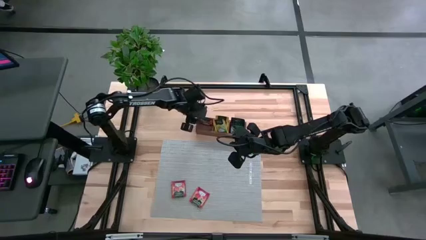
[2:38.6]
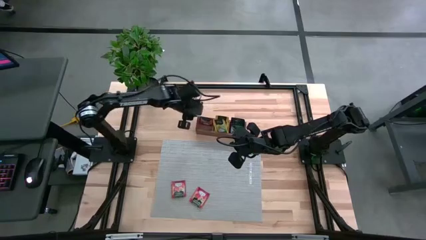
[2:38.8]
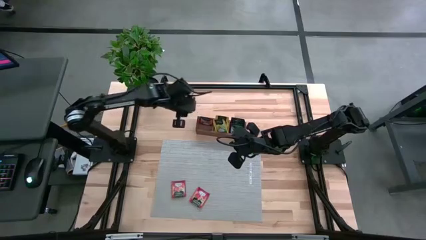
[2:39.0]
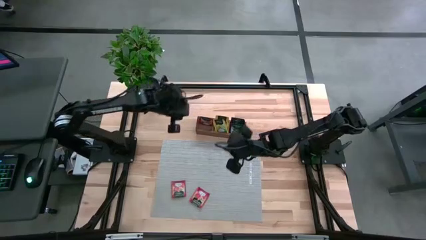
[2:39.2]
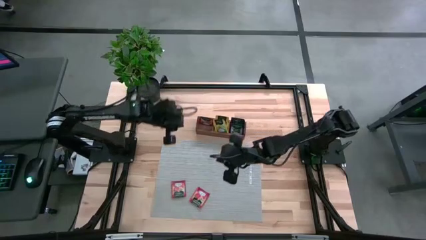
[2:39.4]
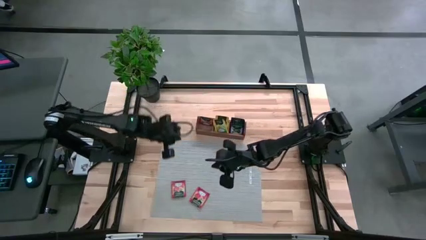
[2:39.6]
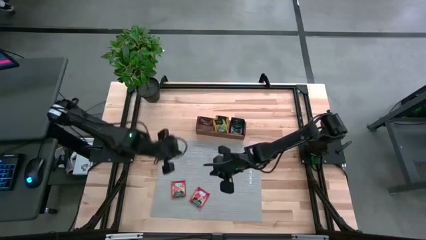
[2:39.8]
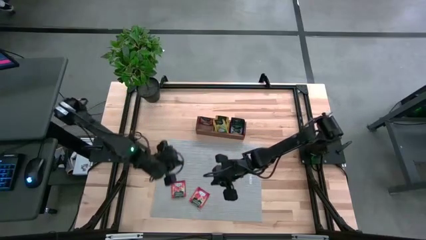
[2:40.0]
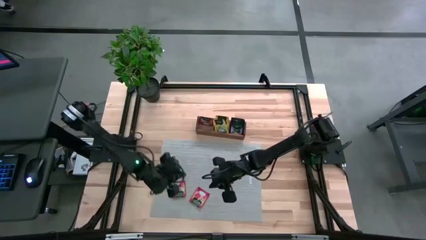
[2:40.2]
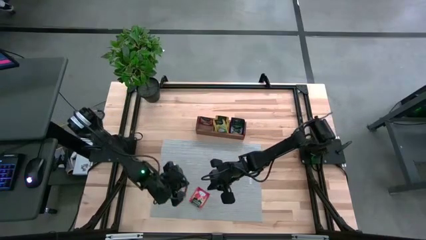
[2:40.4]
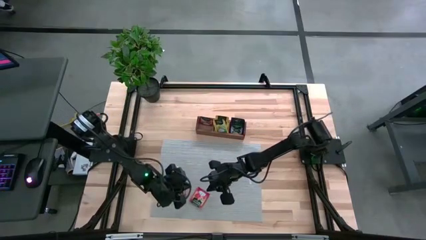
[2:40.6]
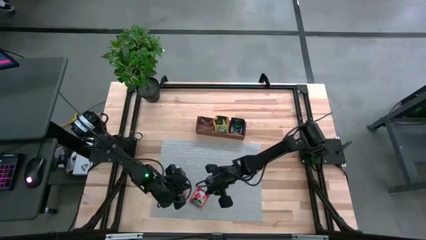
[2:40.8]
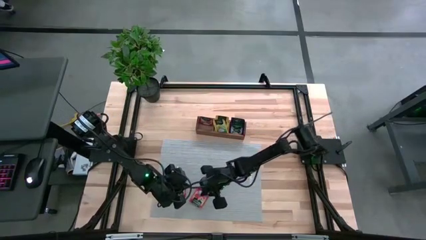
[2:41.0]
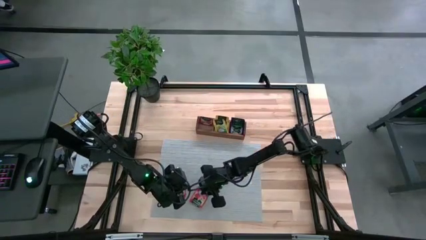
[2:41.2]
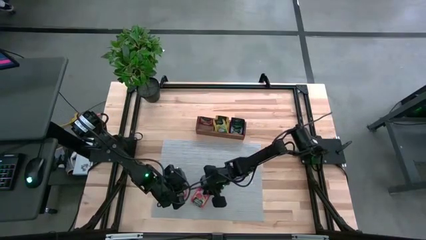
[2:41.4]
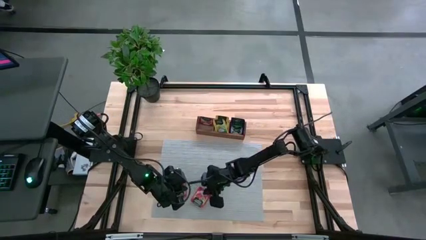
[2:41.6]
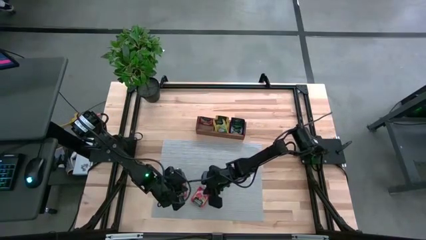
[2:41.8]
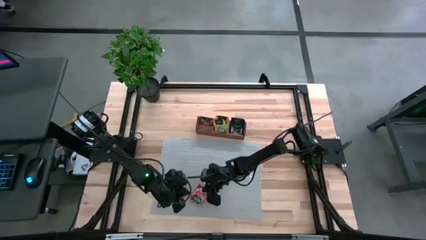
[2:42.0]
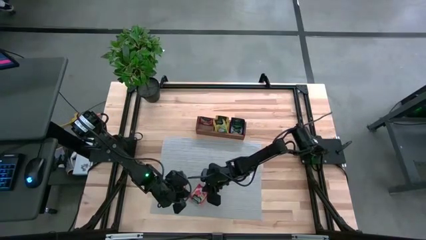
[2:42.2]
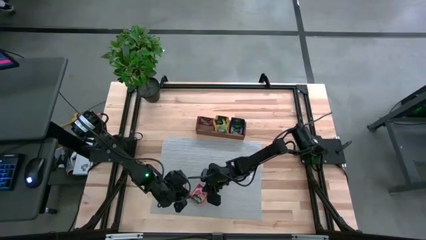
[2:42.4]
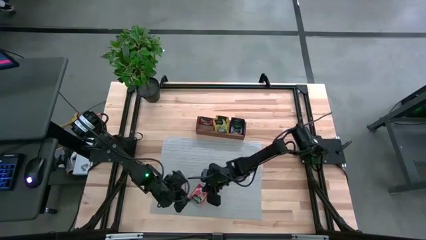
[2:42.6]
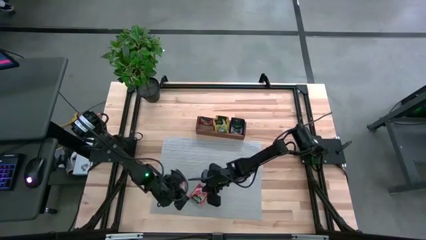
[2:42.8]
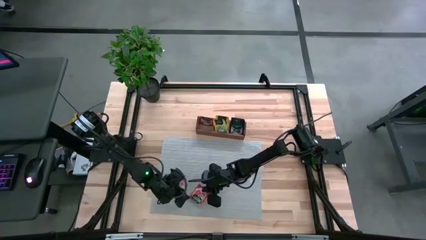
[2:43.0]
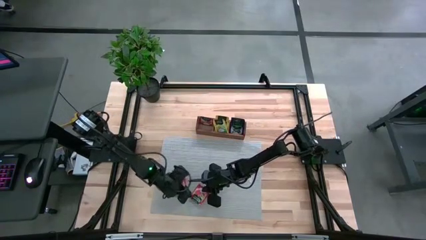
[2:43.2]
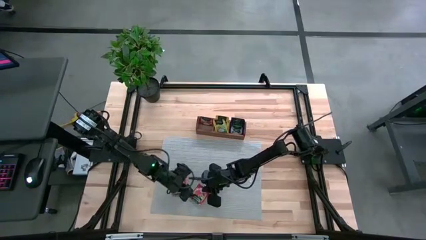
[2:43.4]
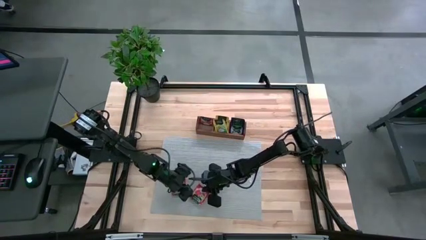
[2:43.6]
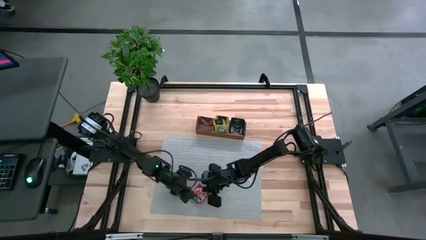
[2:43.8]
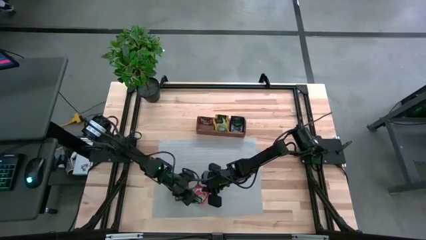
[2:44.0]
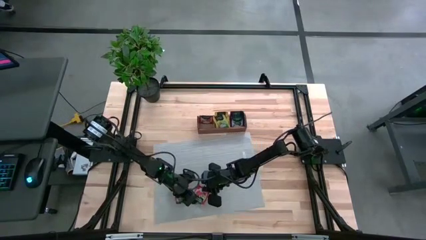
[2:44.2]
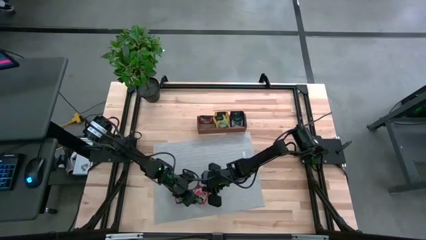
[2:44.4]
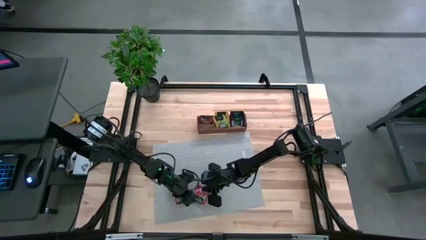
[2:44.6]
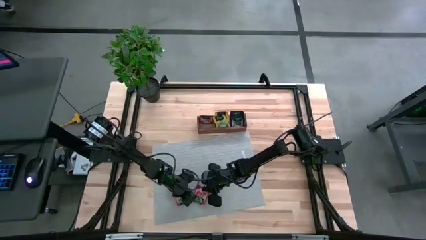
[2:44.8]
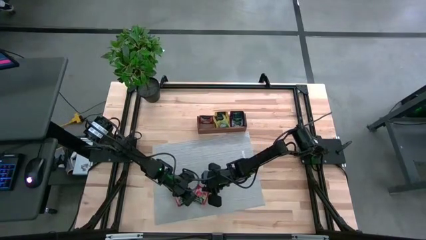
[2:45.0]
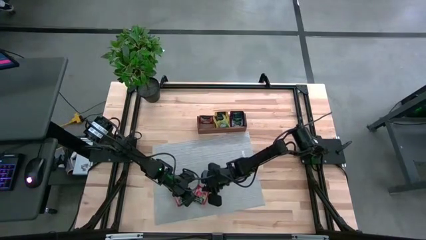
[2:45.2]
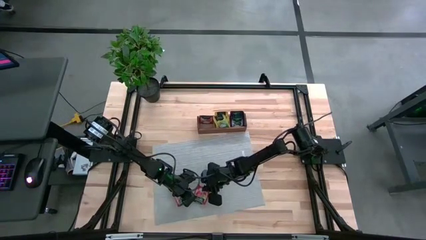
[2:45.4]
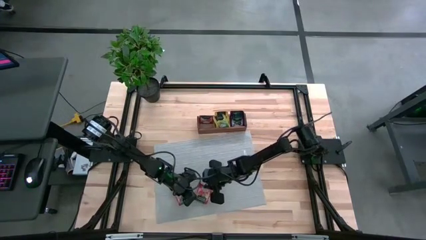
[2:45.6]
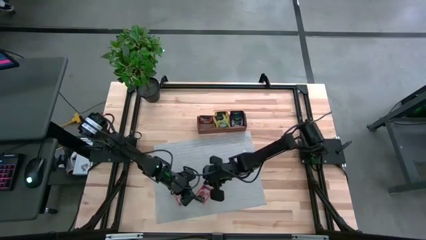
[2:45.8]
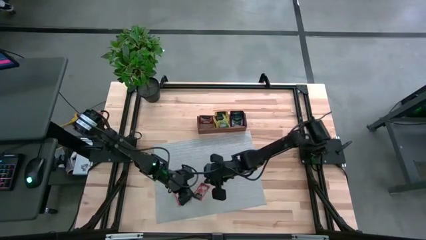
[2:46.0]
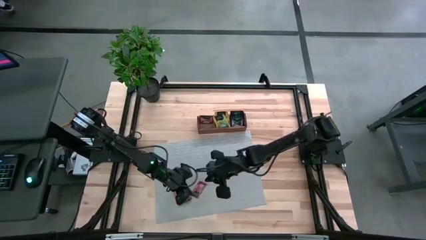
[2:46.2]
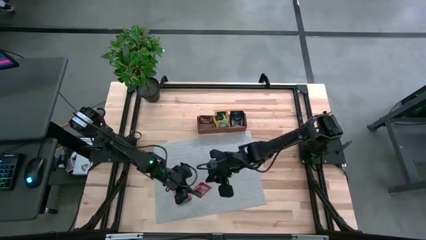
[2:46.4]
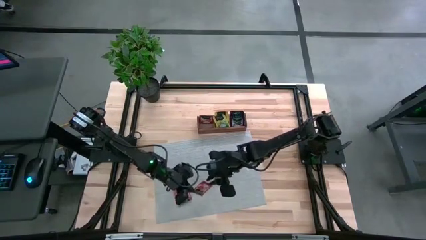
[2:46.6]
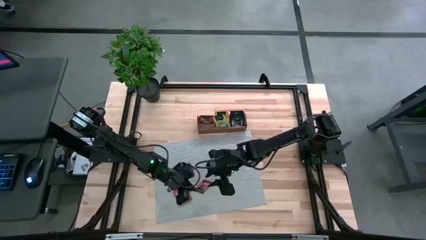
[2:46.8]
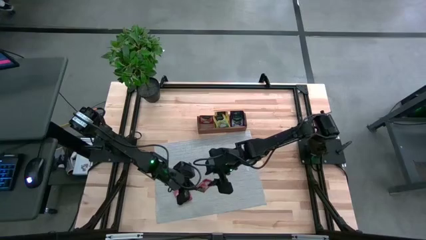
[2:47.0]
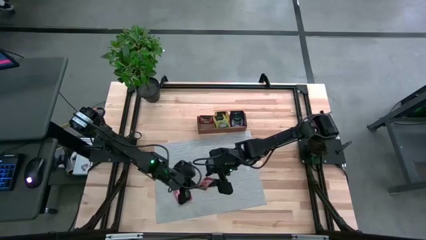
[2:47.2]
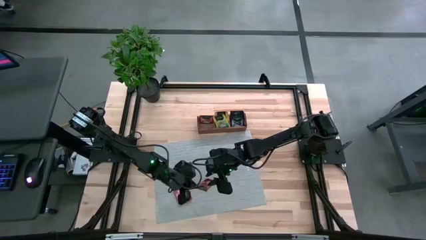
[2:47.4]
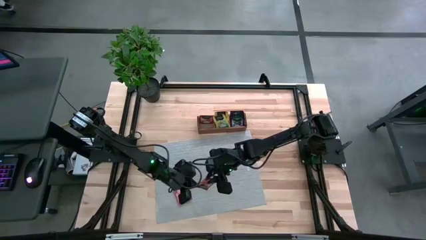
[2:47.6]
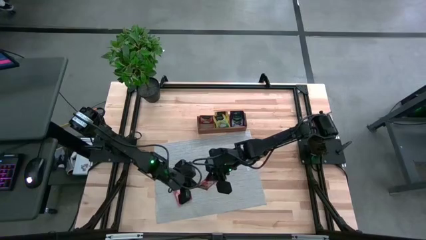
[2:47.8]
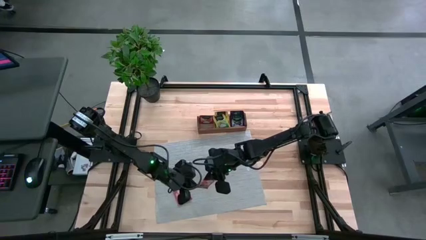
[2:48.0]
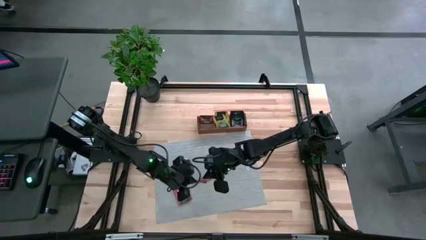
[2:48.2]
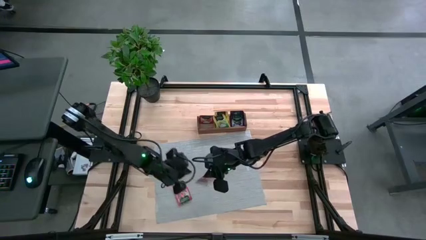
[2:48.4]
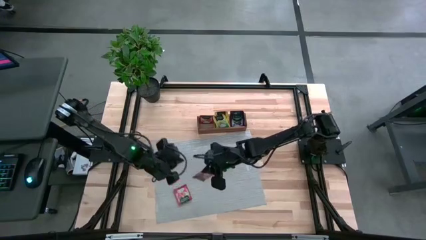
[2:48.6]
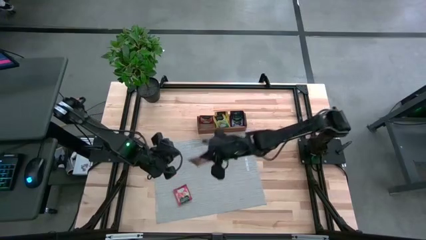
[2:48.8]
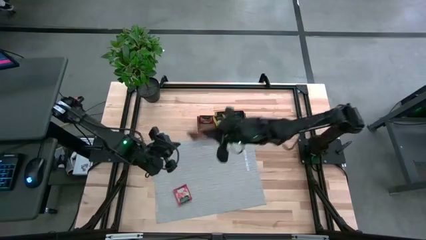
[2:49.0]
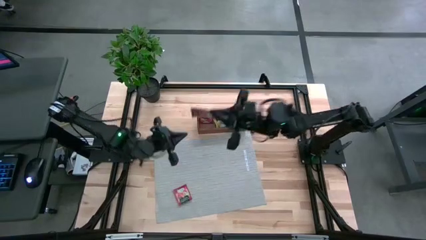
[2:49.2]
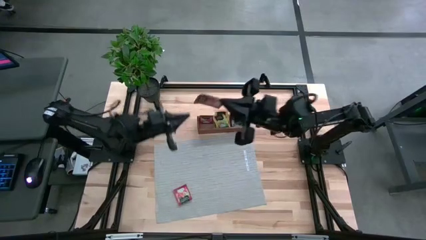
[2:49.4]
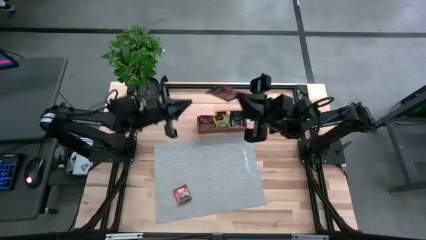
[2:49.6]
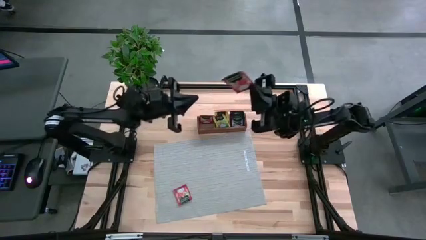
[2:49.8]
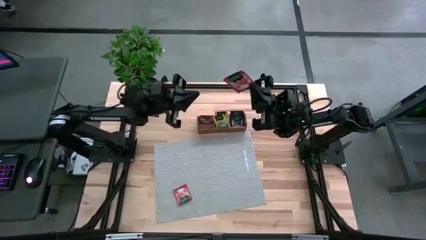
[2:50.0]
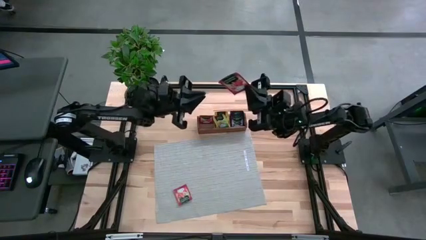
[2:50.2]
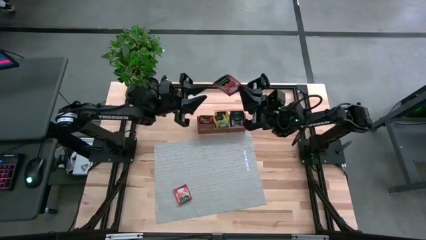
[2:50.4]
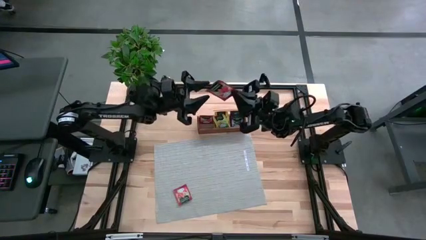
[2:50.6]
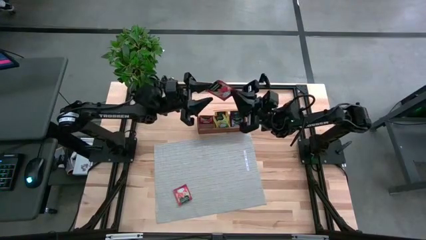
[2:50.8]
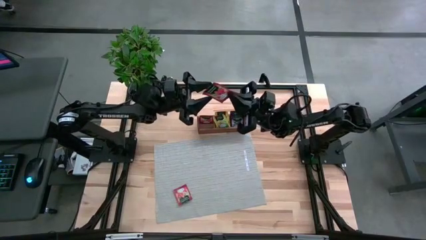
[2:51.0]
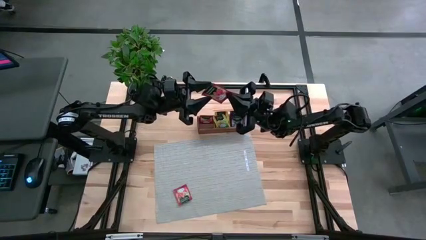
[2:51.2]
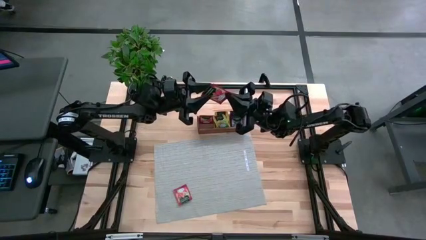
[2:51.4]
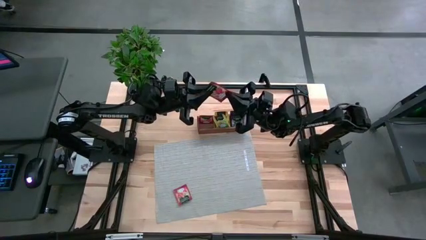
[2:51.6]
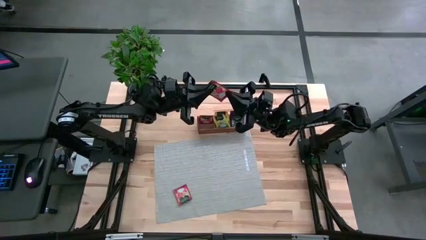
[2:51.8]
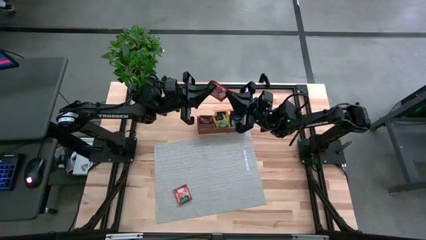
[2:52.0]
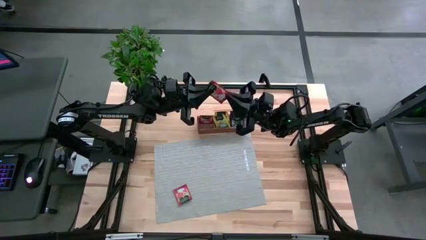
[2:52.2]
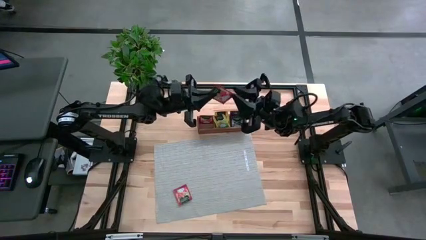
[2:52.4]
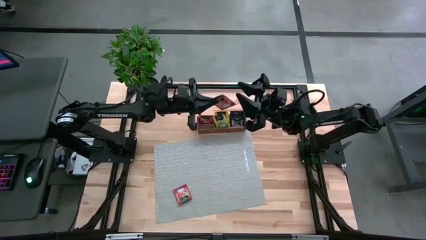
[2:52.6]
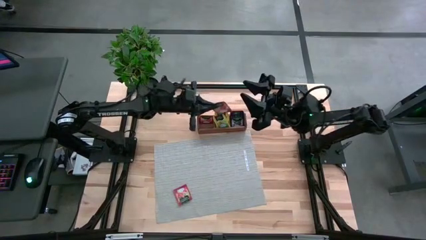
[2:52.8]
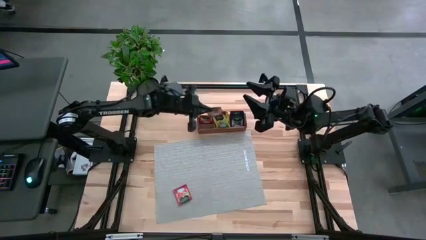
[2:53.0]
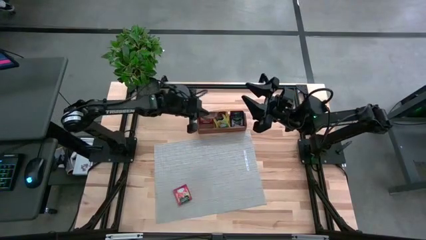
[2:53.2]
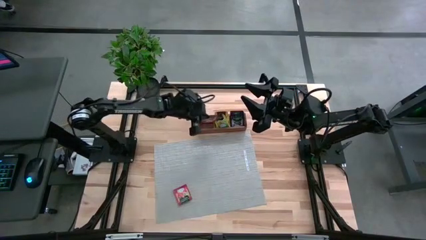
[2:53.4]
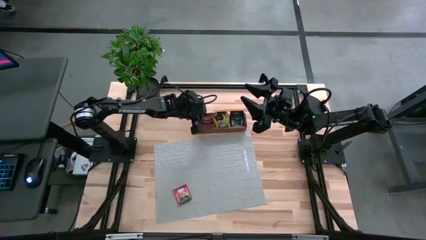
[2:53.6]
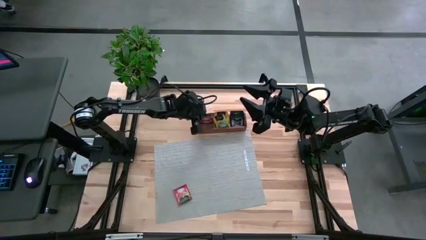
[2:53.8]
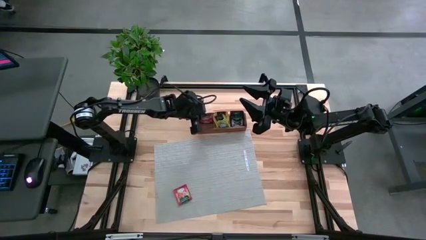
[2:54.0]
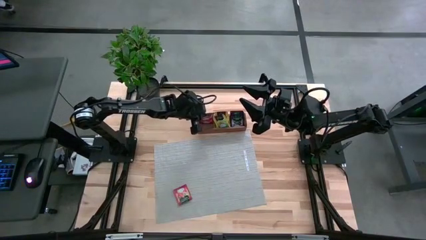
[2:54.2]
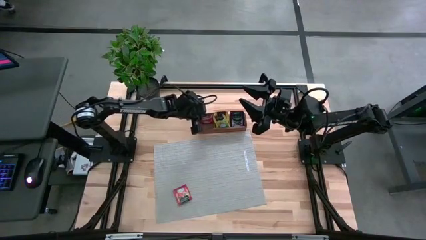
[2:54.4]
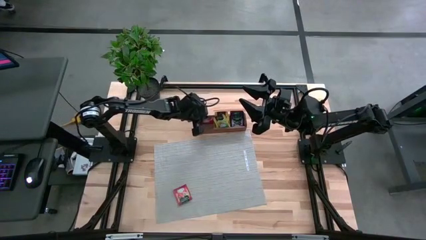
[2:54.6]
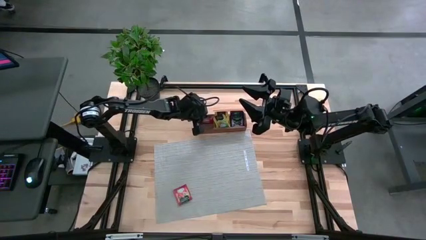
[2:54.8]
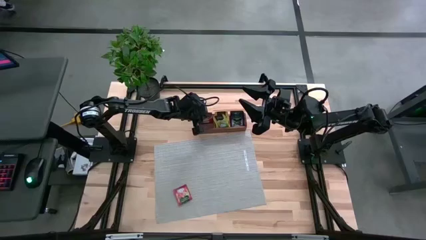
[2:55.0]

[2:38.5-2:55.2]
Task: Pick & Place Tea
Put the red tea bag into the left section of the wooden organizer
